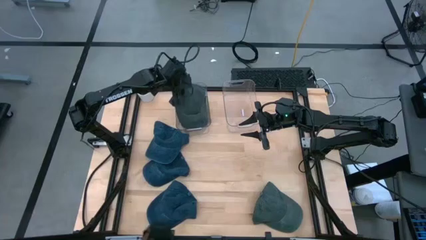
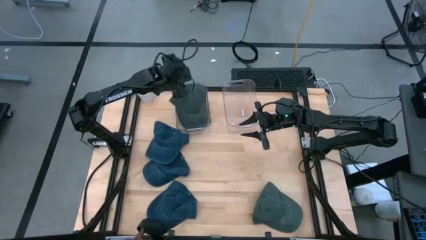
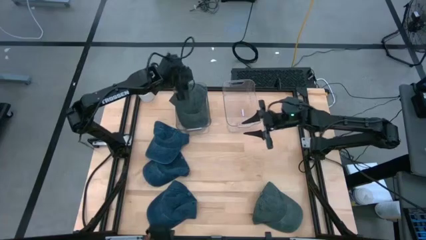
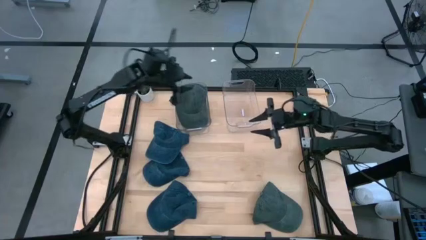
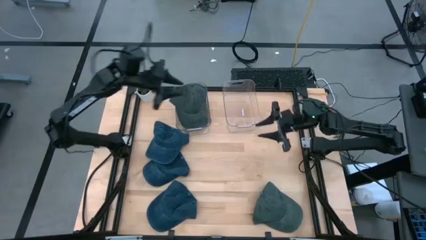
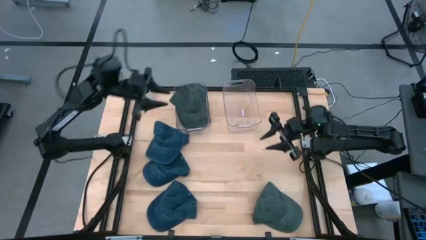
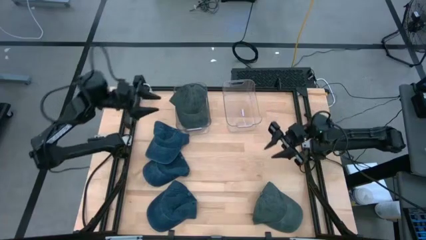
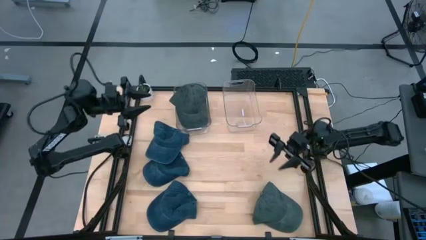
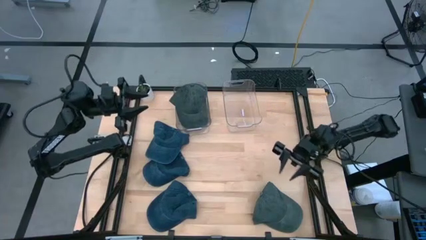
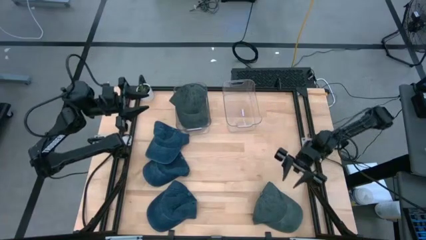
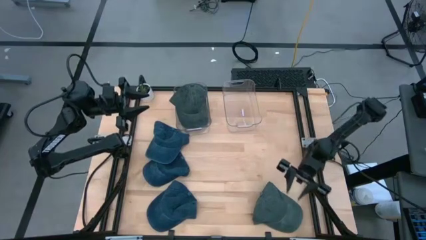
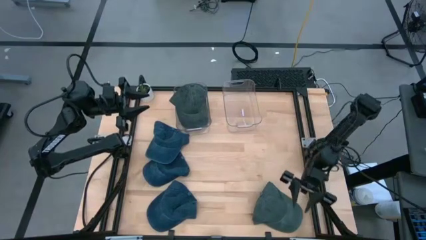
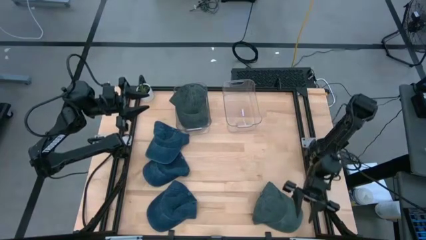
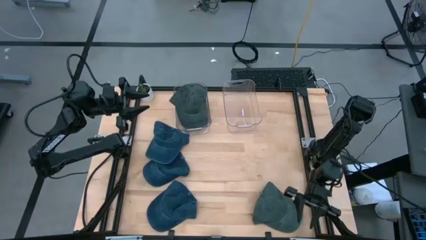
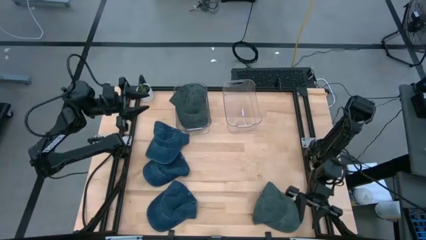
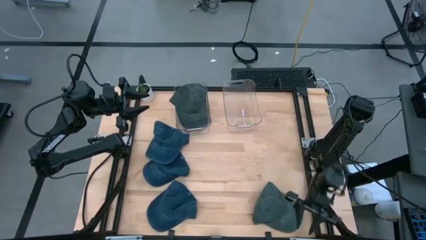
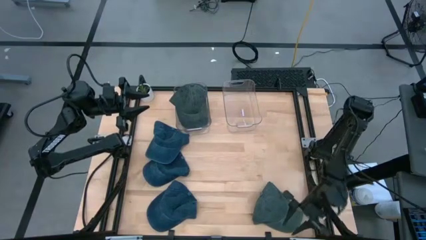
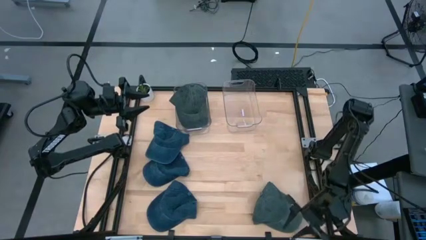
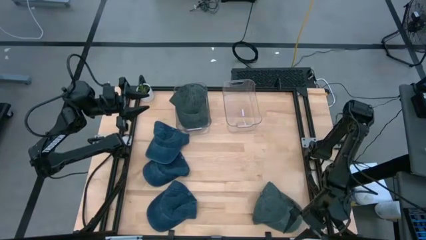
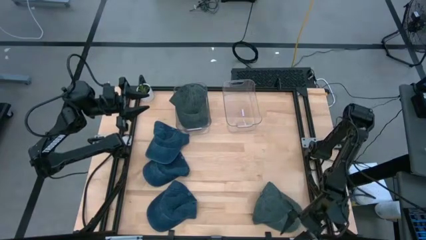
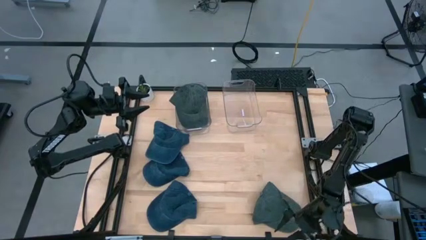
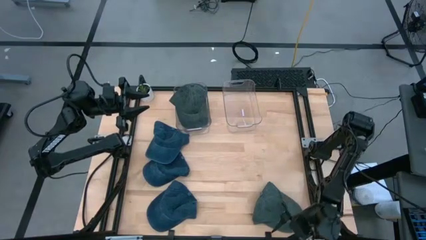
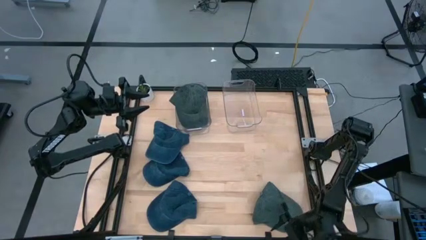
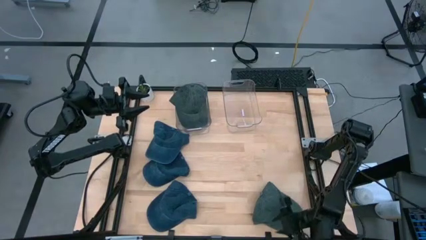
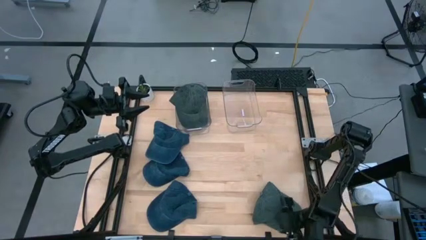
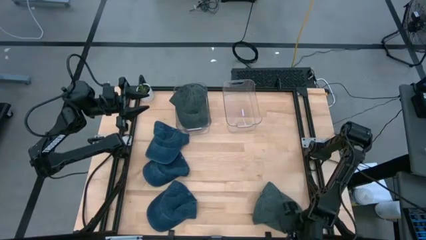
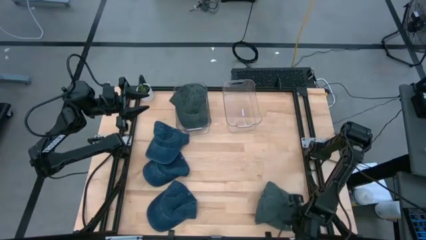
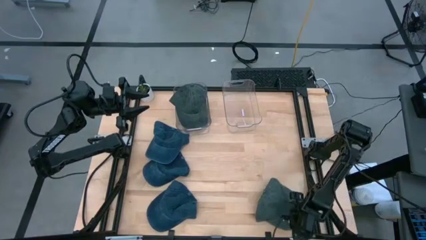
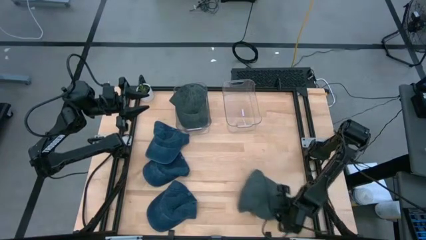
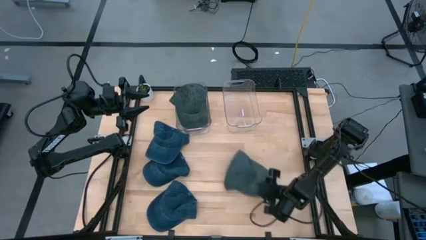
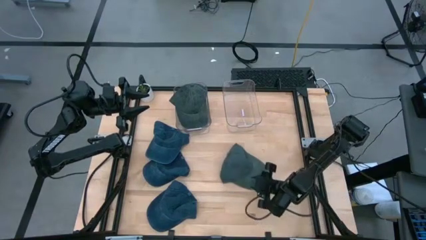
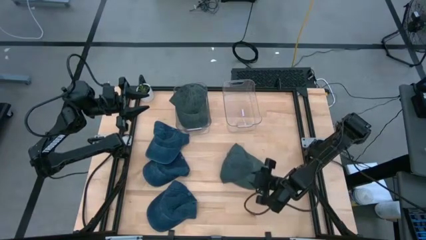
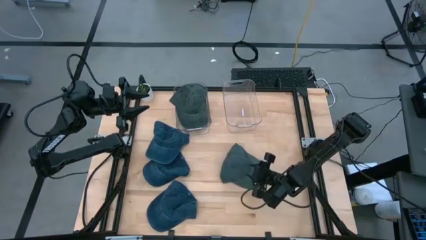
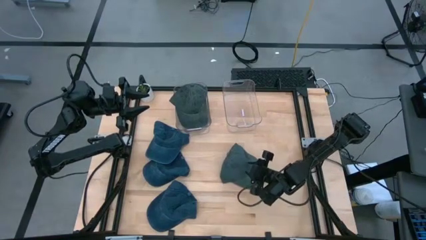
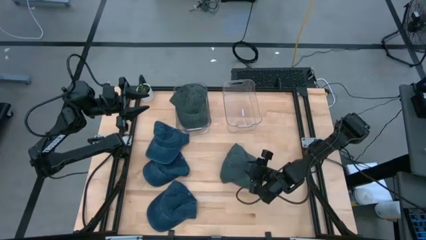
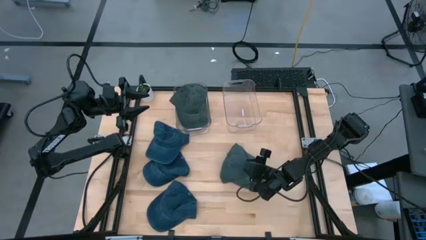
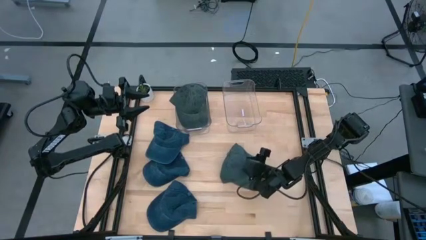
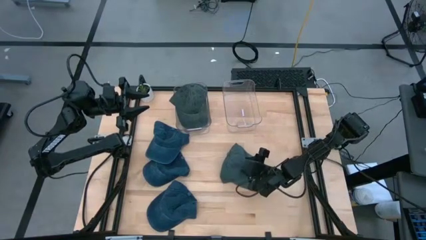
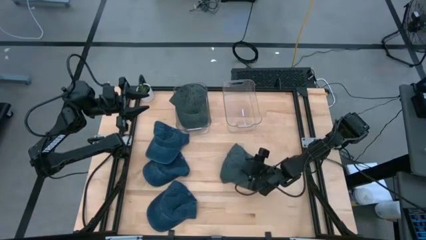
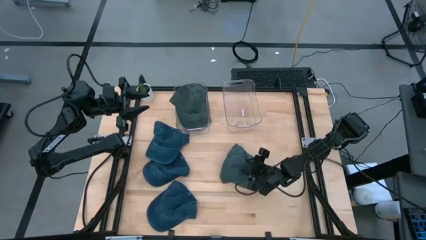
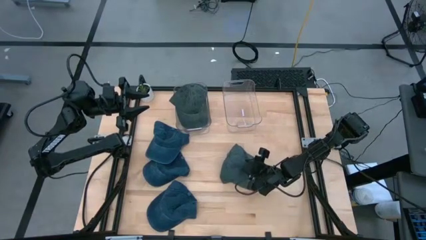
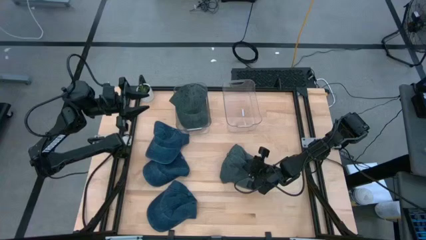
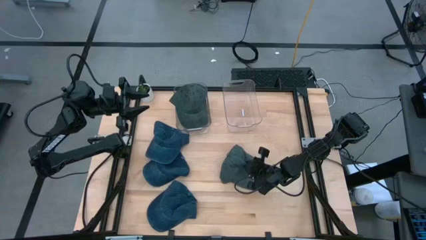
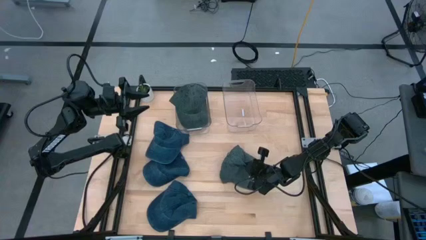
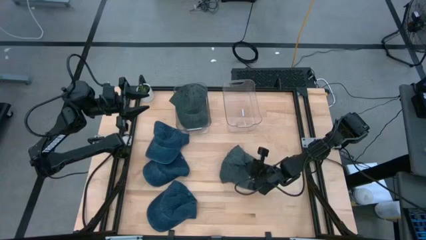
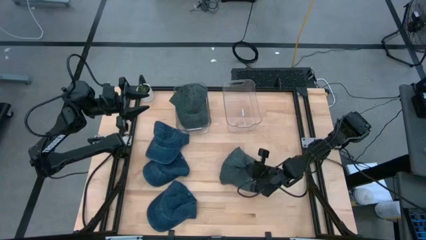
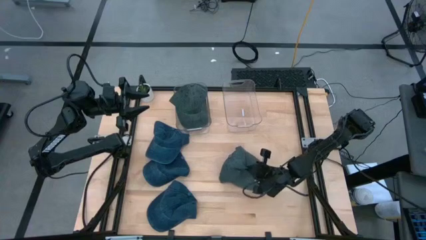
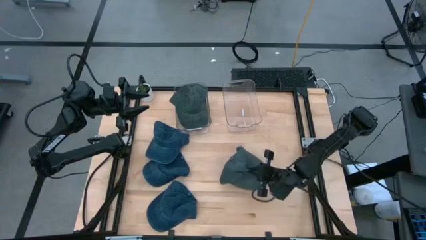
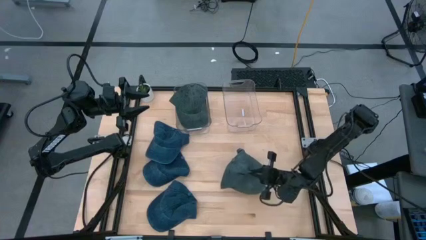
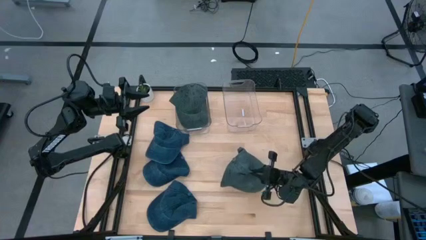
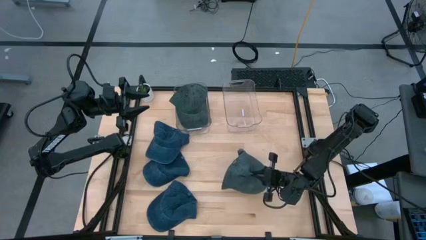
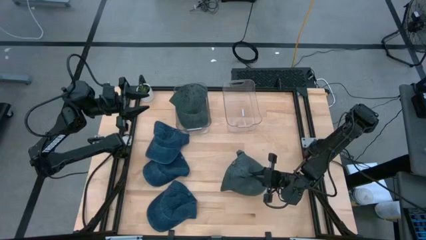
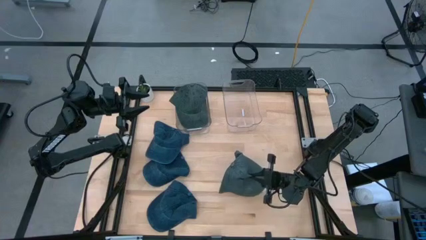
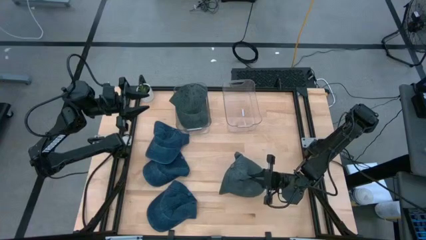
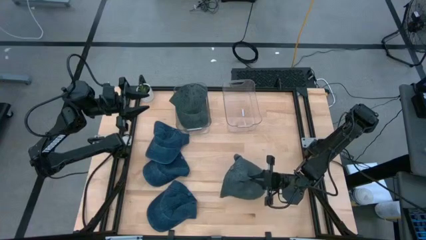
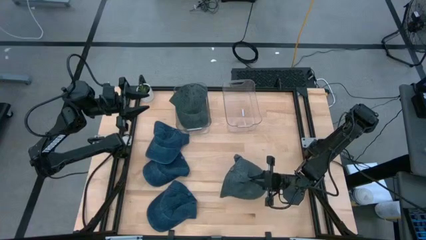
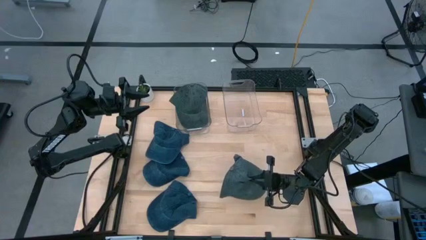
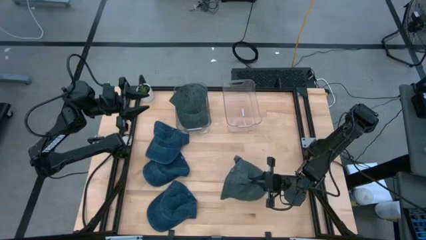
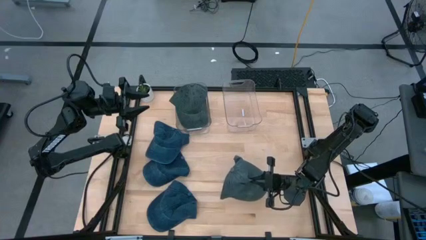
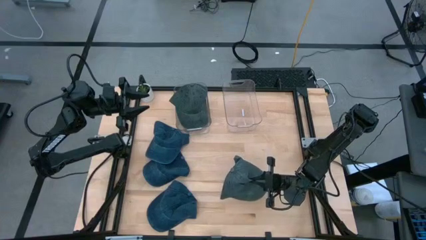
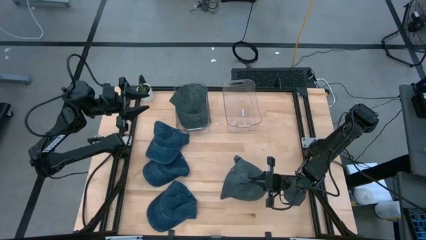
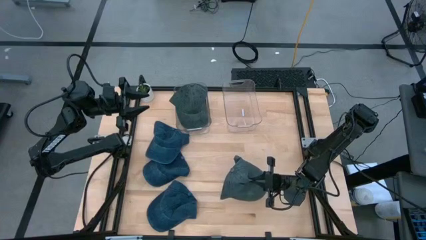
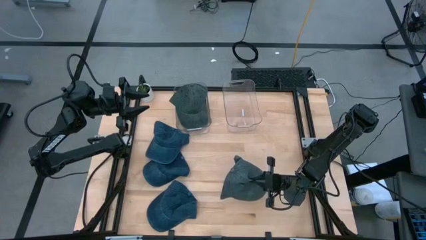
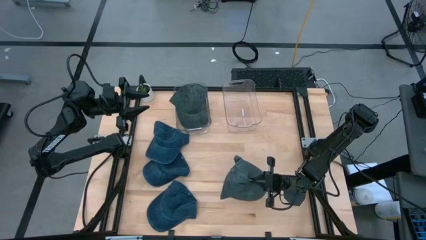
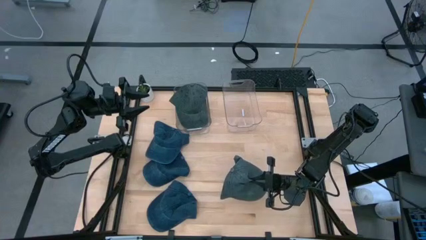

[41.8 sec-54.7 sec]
Task: Pick & Place hat
Put the gray cap into the left transparent bin
